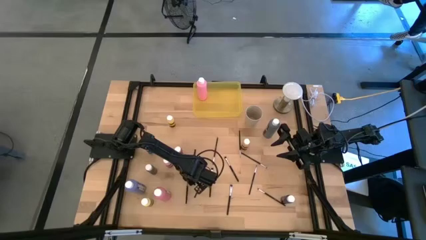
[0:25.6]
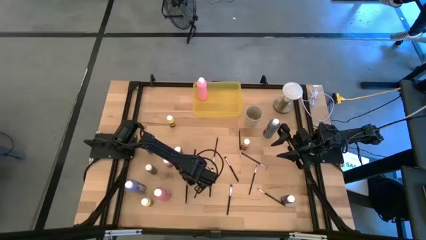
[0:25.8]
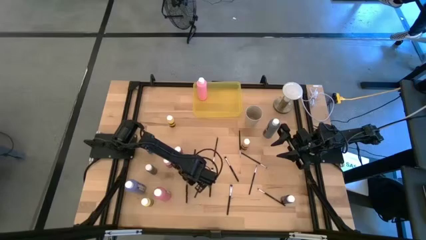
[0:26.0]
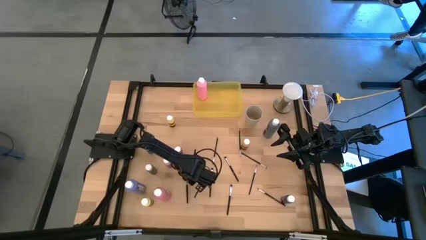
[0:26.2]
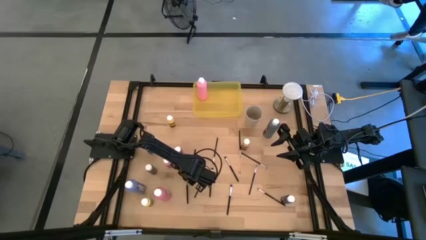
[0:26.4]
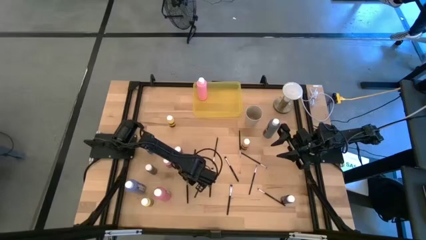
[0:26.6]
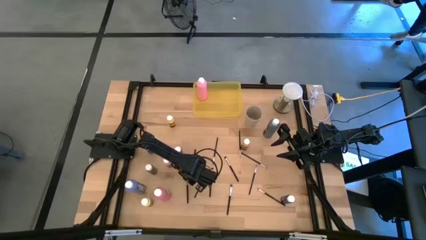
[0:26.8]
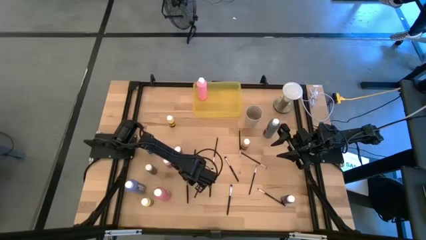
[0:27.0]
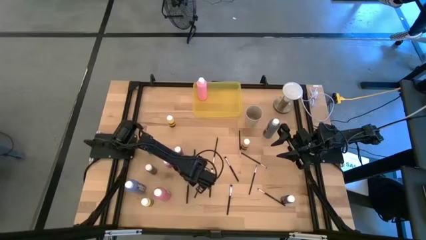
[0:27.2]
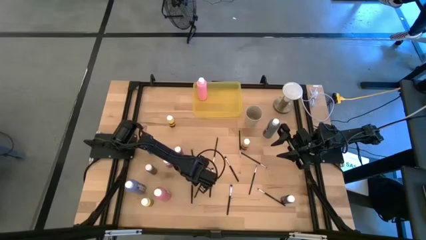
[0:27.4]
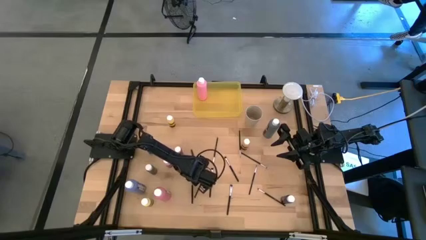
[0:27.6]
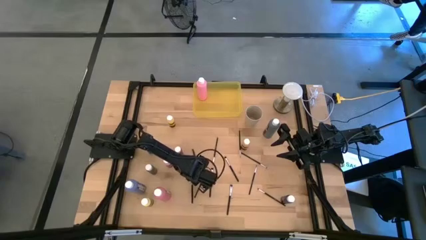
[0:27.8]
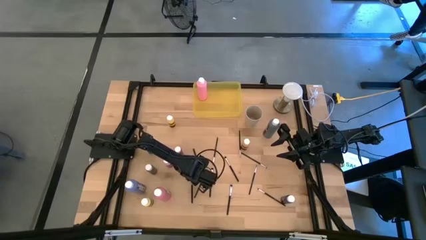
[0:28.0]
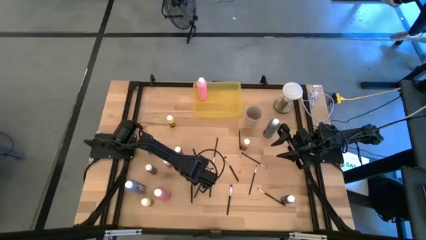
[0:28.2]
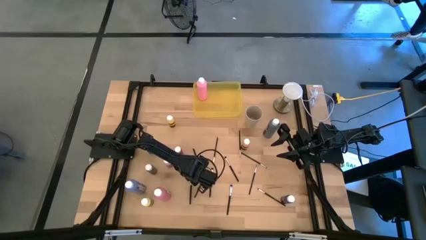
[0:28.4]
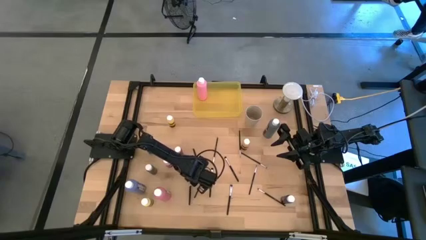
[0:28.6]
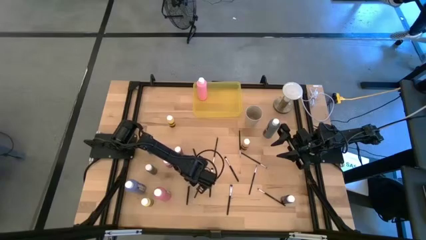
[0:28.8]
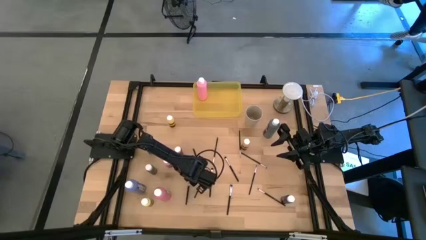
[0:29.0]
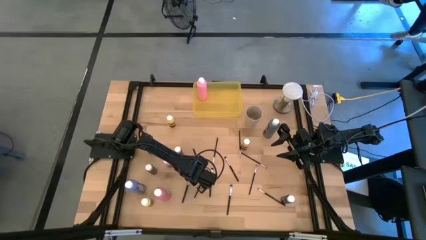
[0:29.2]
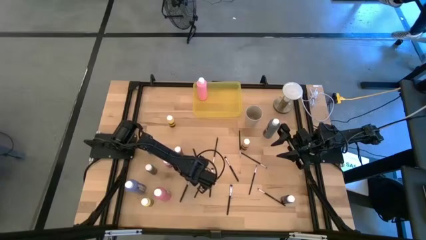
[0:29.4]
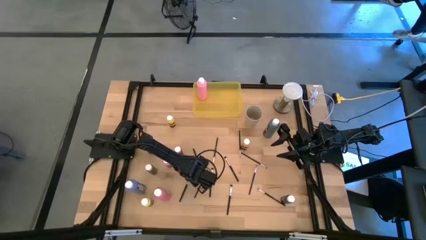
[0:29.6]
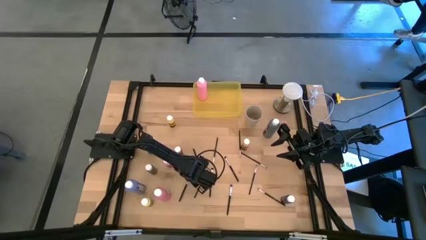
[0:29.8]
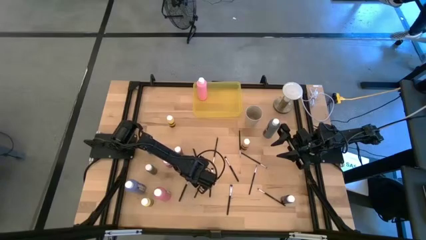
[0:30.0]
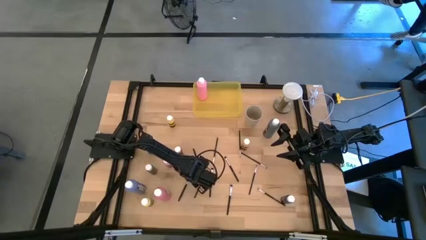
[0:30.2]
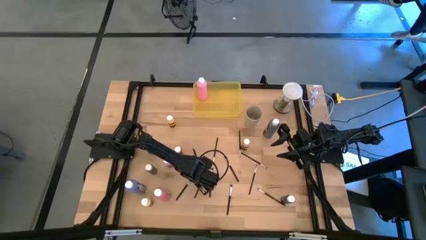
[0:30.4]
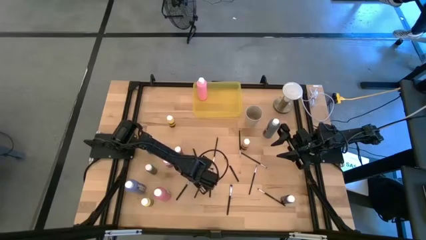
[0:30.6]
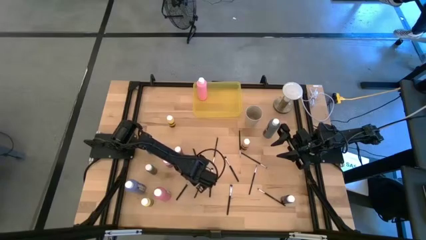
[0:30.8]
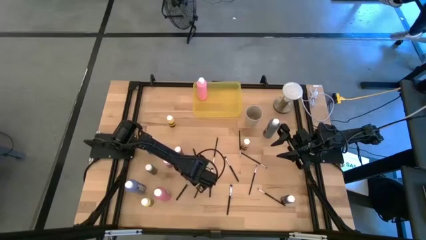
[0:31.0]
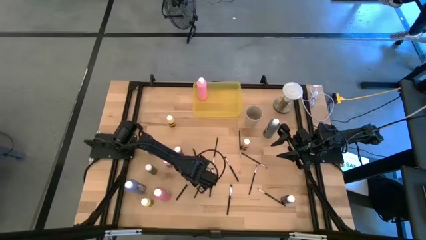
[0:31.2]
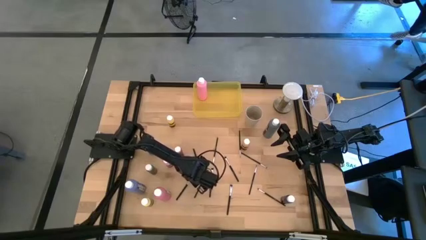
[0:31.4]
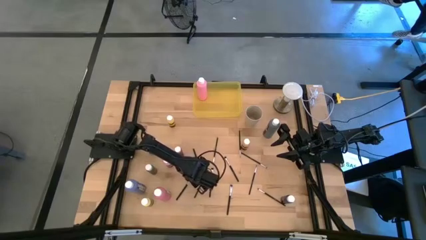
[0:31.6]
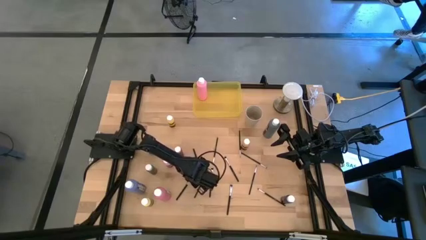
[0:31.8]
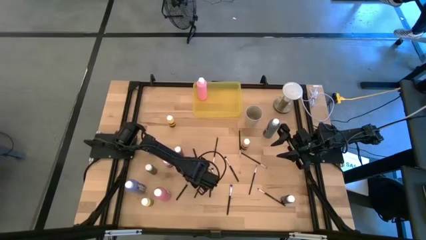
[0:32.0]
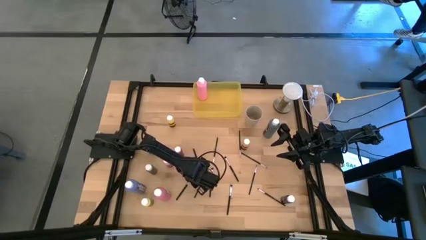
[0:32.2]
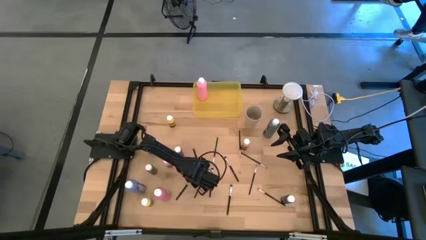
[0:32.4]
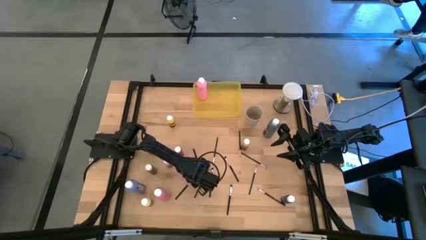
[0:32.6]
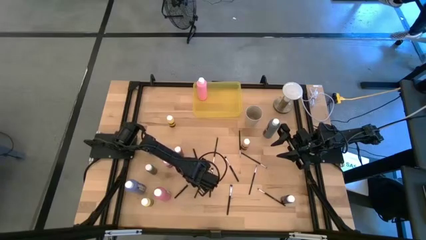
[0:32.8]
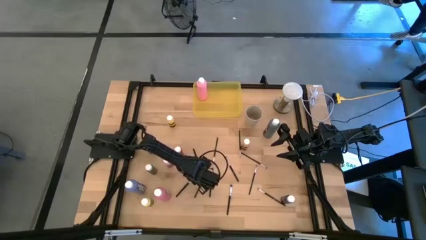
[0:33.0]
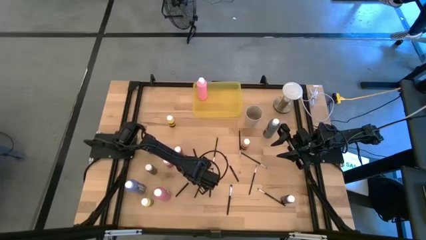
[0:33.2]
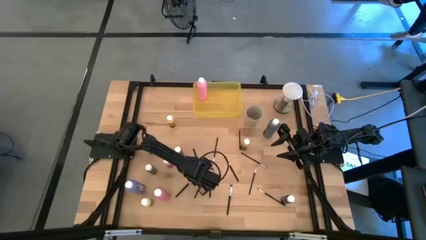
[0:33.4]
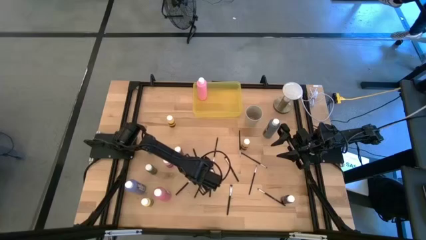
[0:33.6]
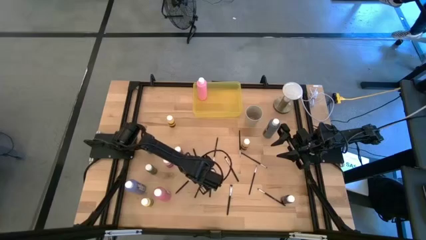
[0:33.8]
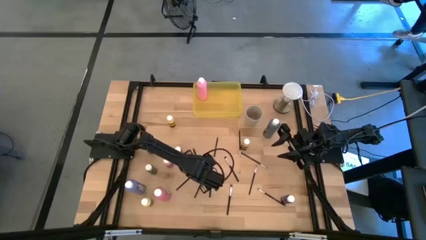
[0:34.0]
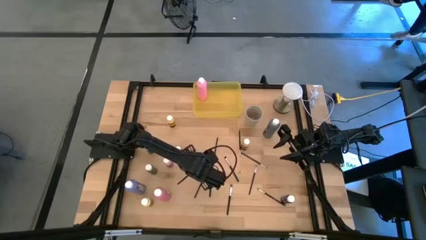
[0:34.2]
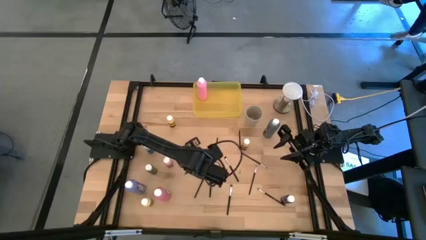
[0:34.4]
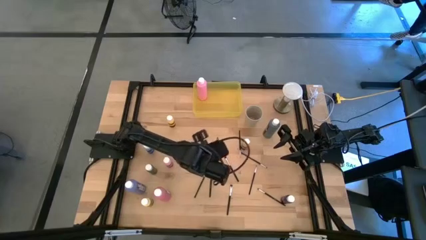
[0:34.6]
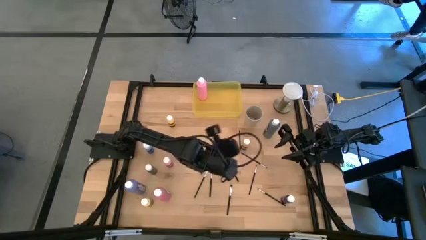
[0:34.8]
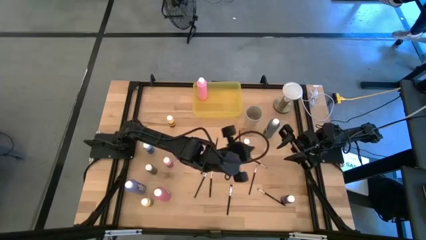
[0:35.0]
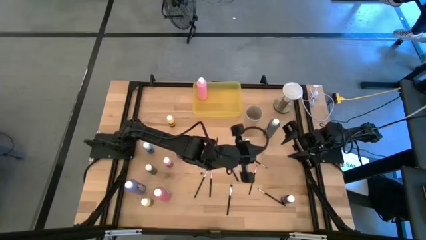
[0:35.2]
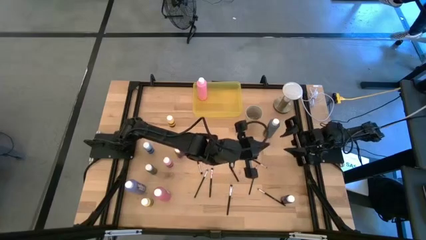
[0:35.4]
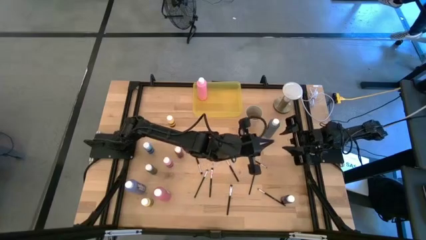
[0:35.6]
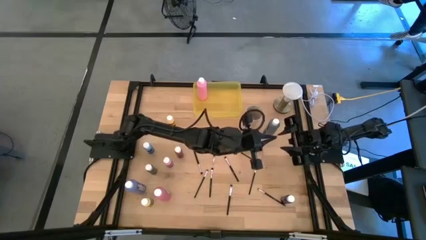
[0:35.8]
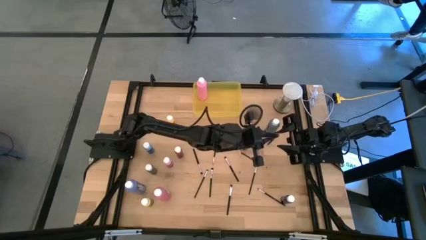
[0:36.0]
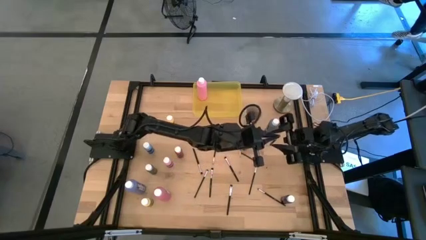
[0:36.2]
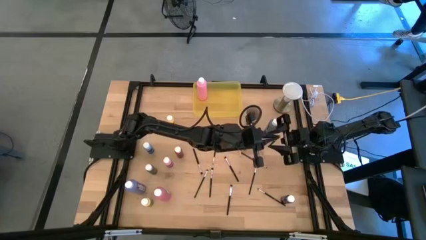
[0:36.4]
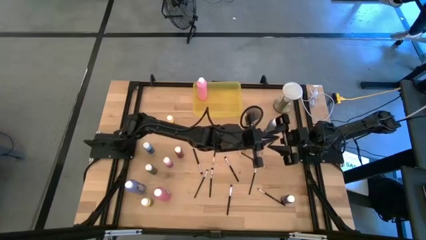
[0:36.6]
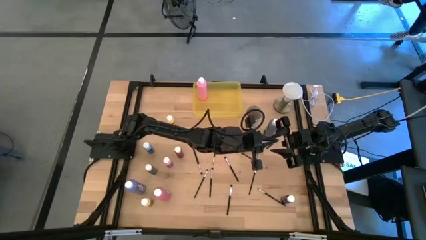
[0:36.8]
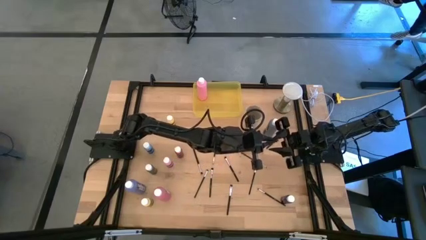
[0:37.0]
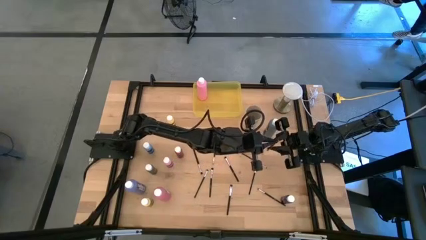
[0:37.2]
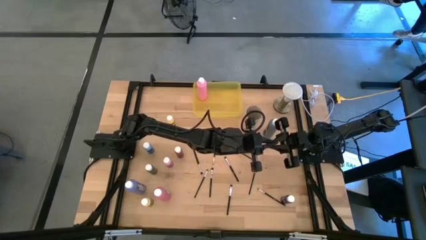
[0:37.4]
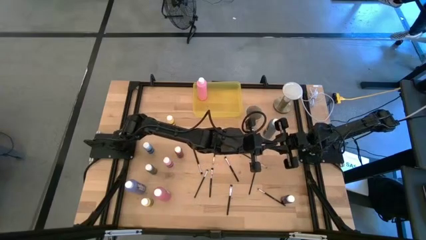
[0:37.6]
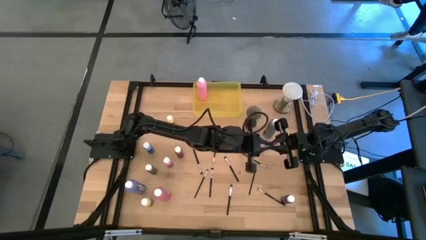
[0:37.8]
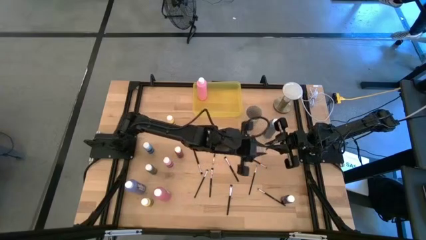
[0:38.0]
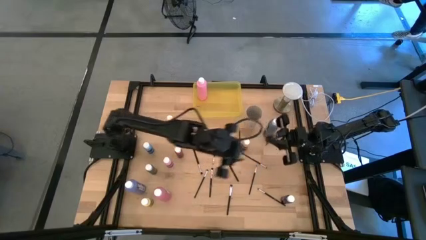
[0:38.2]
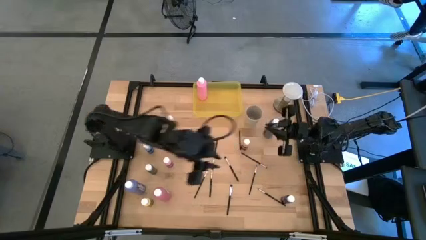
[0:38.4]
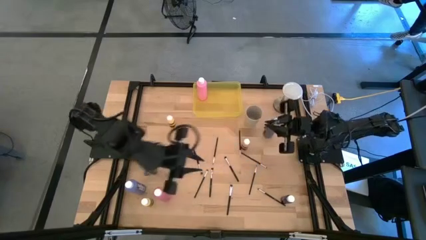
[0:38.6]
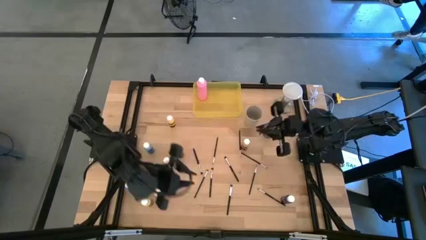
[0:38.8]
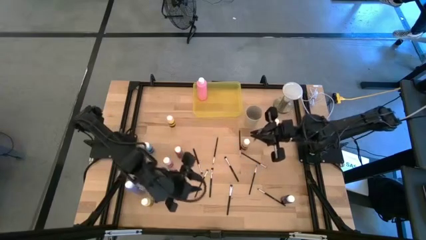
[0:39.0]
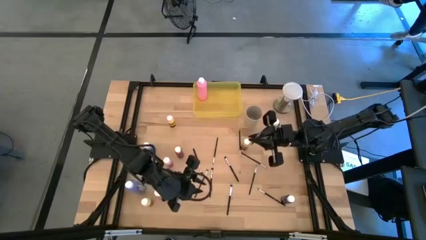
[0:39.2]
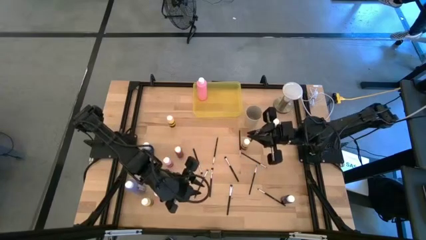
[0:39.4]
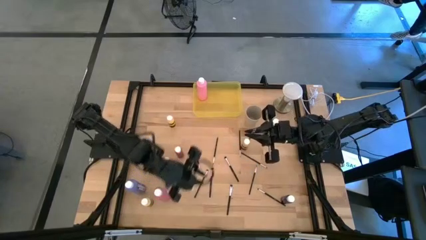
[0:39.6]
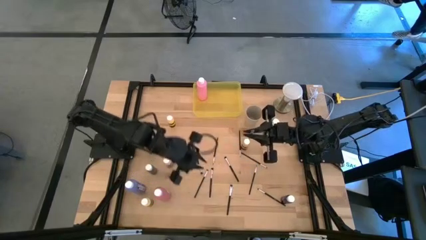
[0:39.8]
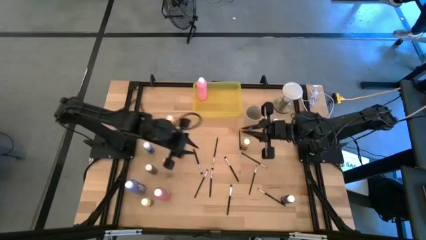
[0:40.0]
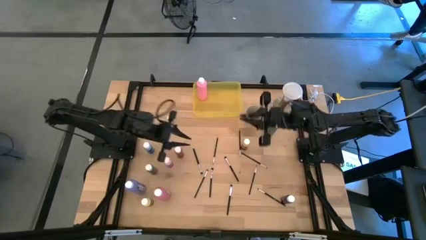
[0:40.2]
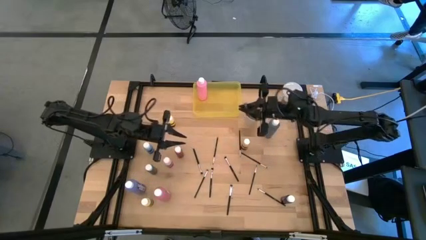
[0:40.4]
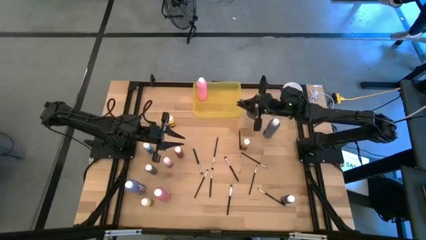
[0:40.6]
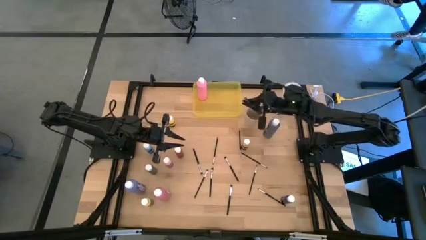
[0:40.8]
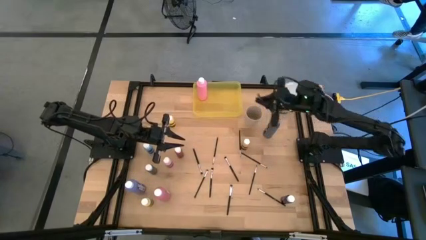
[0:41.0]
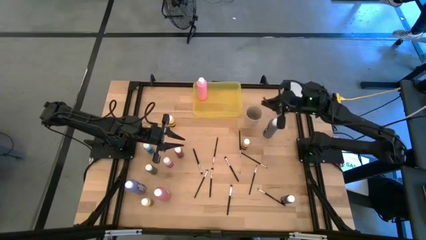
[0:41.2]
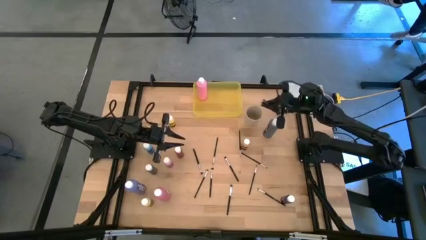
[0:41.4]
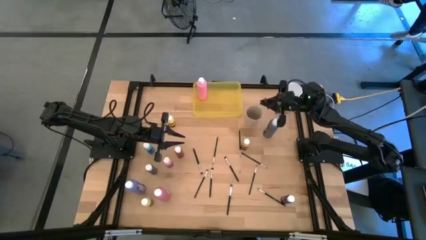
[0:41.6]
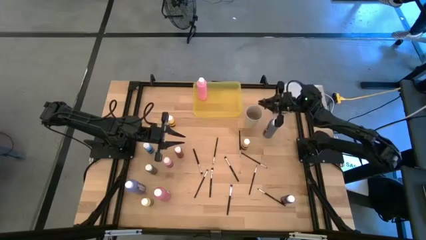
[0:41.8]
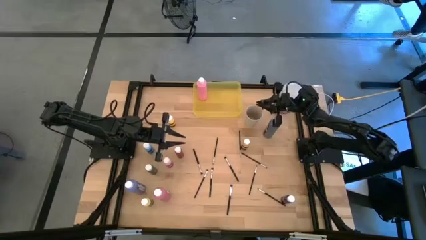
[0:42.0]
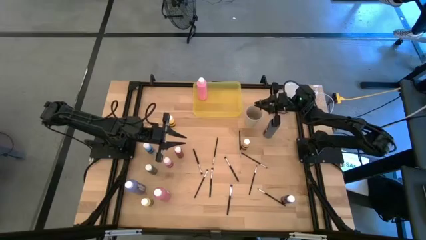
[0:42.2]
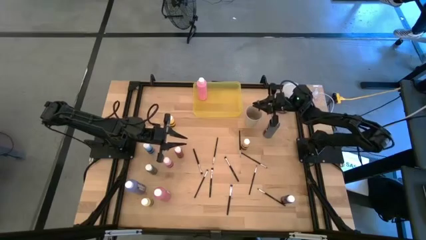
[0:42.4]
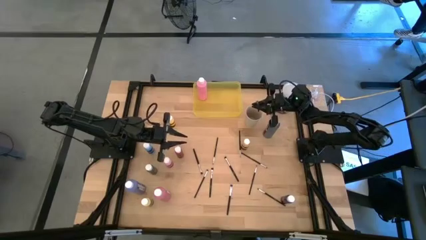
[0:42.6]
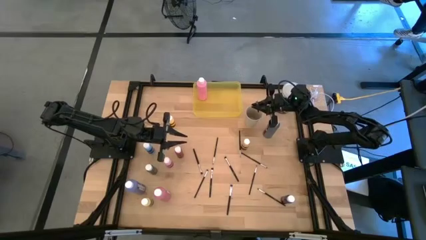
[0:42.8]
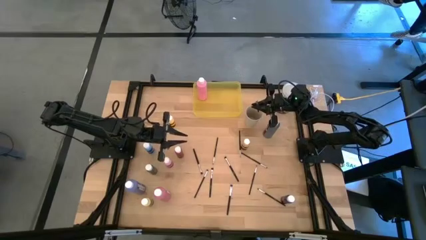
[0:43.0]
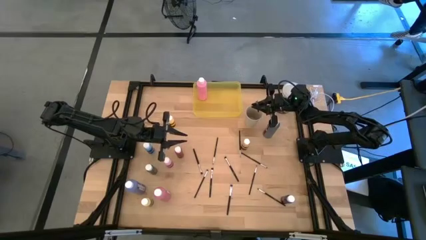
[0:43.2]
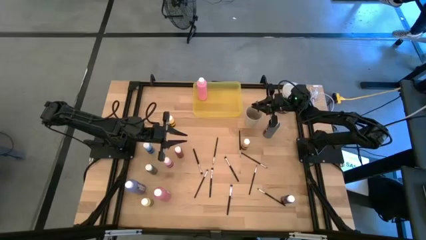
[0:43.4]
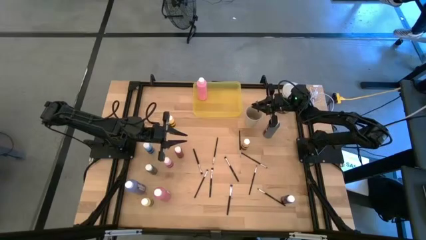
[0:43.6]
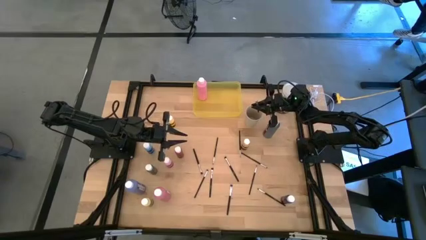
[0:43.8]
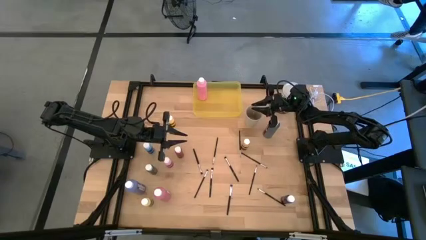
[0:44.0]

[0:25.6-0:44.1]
Task: Pick & Place Paint Supplies
Put the silver paint brush into the white cup
